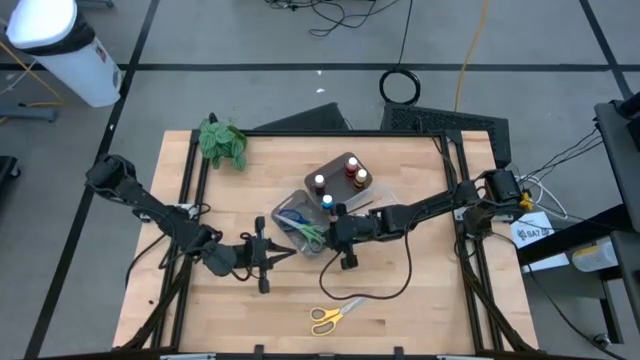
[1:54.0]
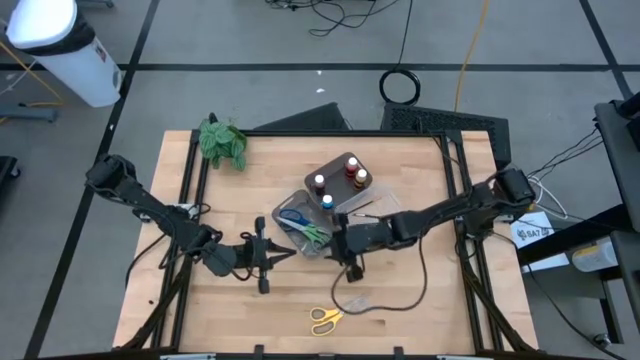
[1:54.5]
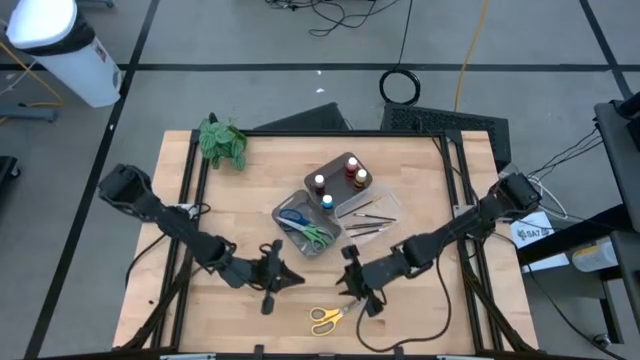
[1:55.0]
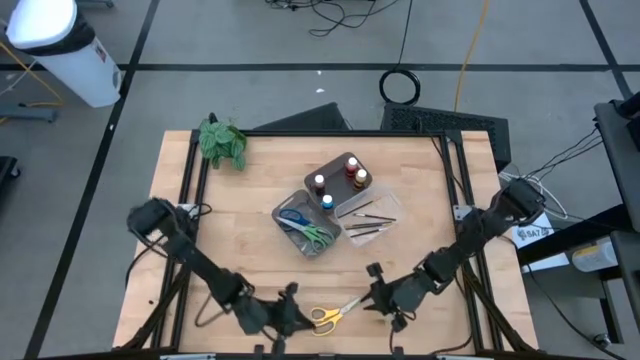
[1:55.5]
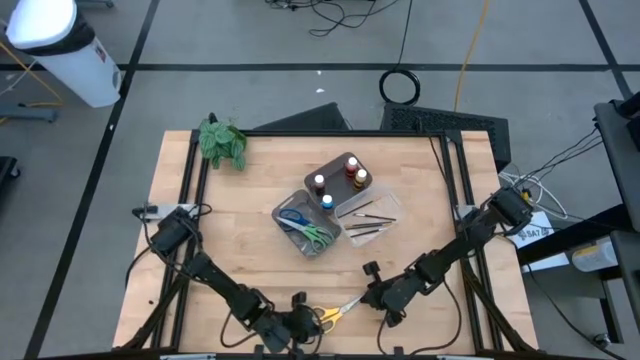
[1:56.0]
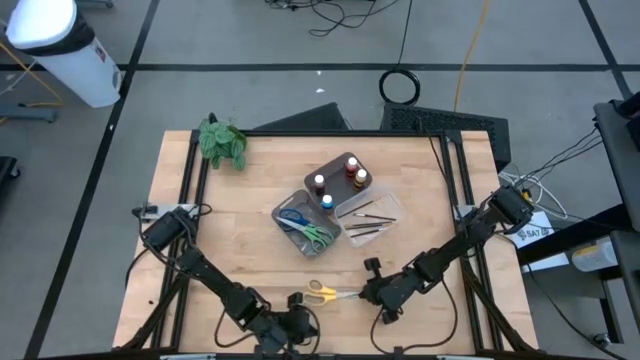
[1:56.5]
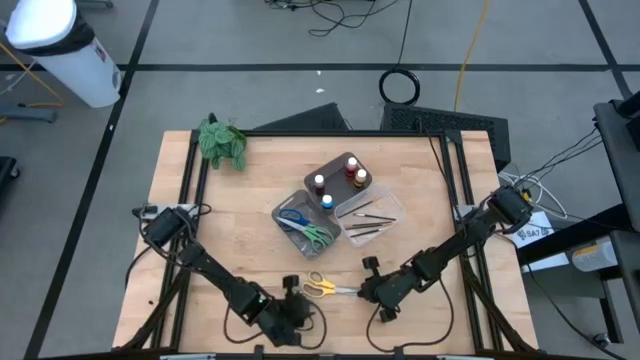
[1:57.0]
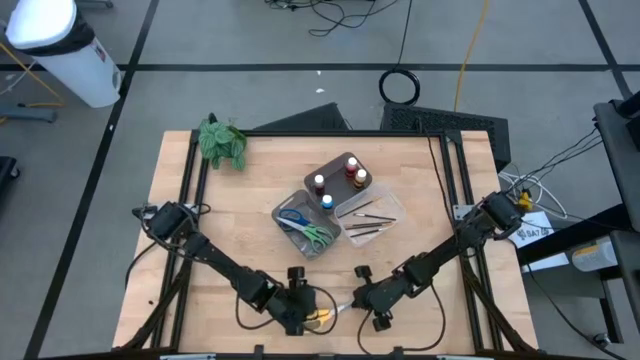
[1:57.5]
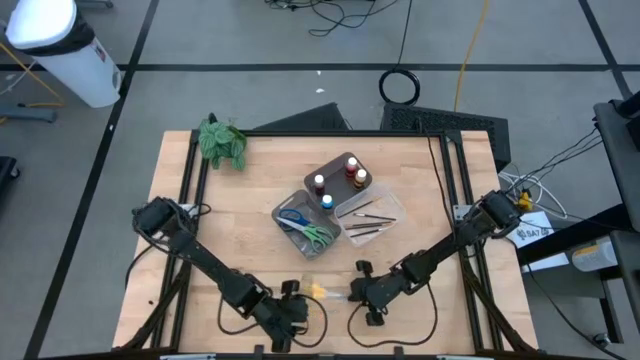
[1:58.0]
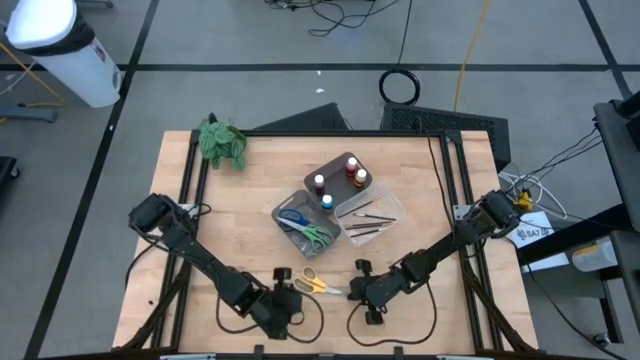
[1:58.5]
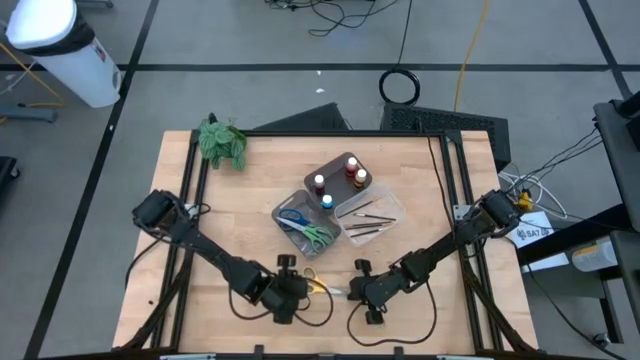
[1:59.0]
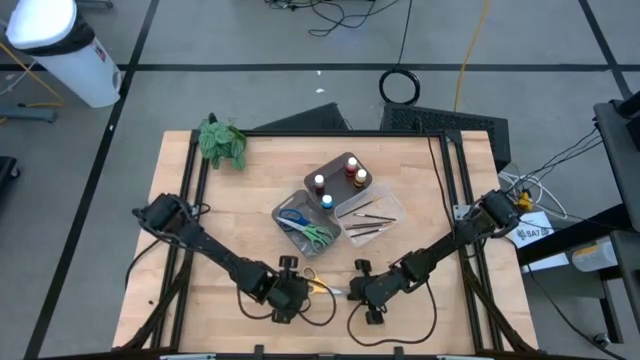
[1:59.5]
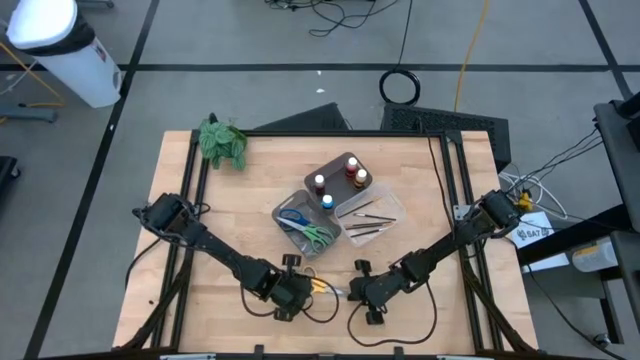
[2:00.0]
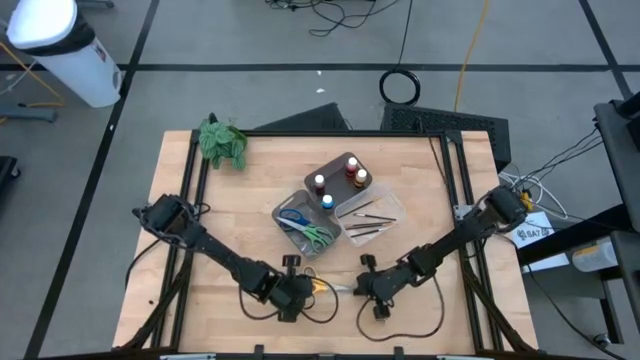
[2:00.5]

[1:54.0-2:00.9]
Task: Pick & Place Paint Supplies
Put the yellow scissors into the bottom black bin

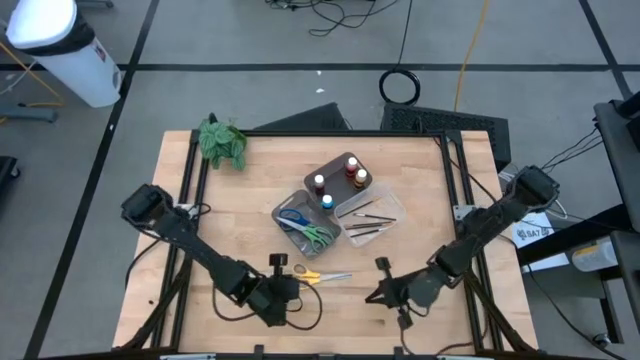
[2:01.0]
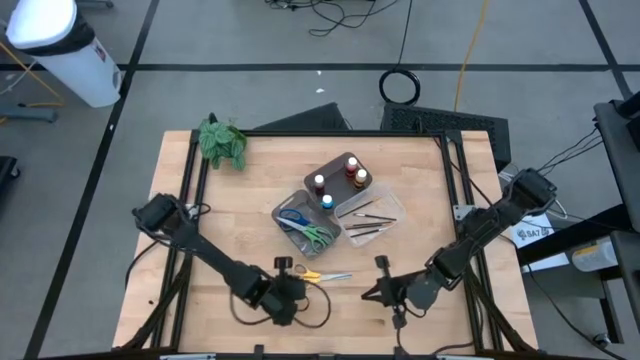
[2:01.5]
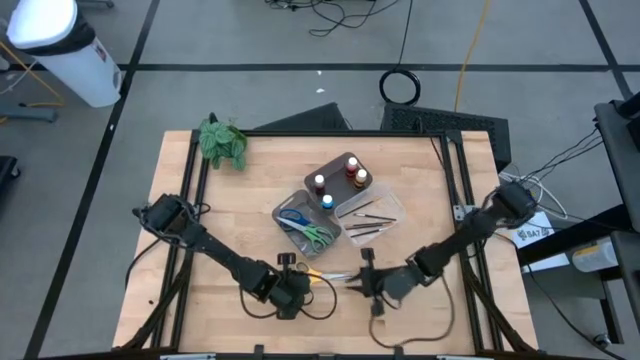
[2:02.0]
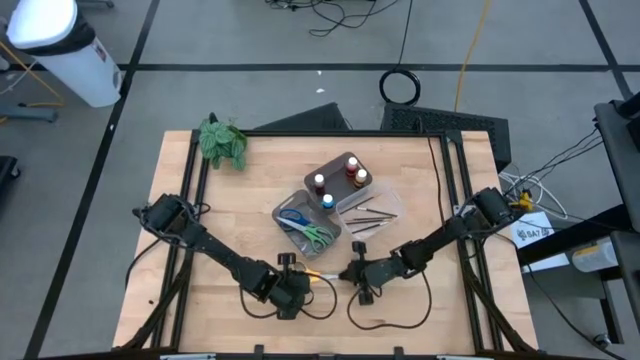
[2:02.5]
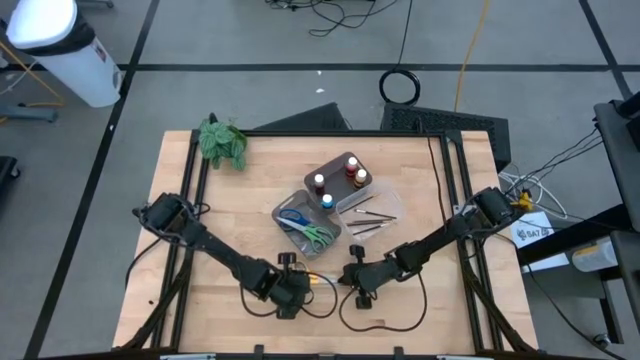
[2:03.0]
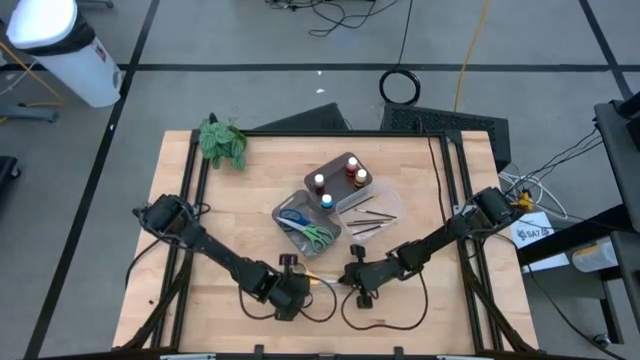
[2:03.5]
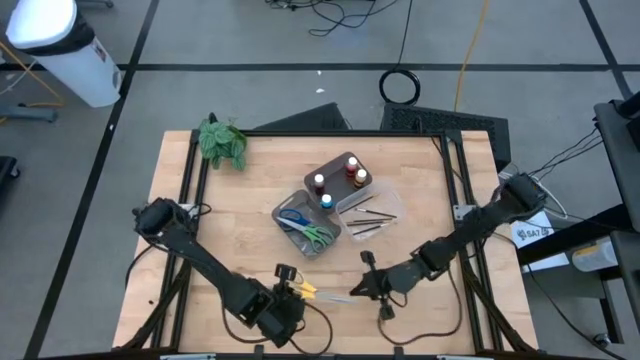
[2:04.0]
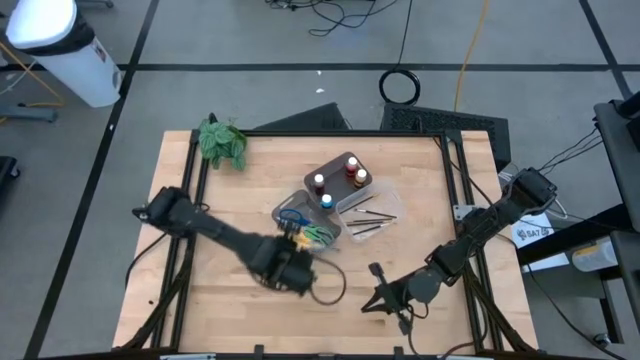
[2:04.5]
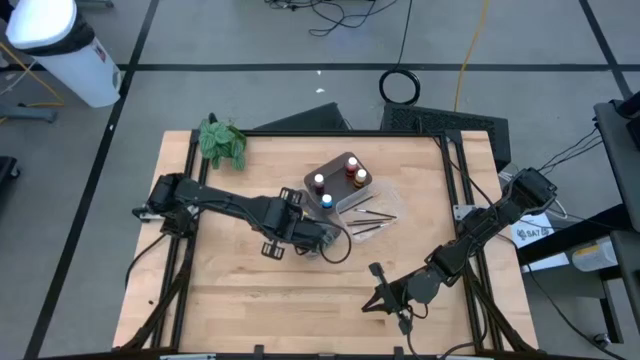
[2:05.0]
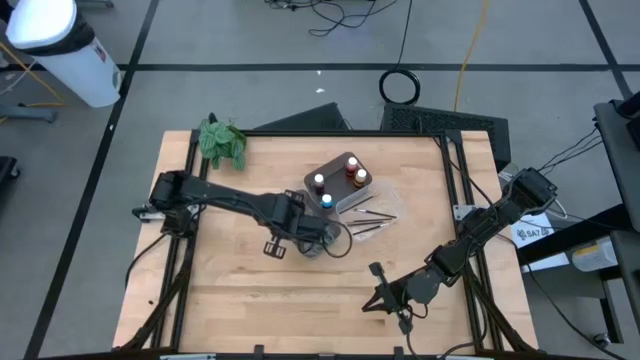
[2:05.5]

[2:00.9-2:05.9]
Put the yellow scissors into the bottom black bin

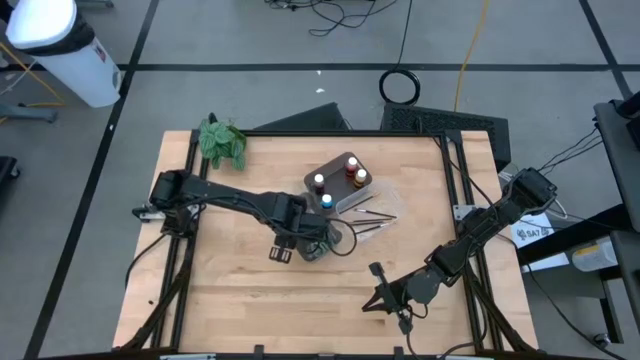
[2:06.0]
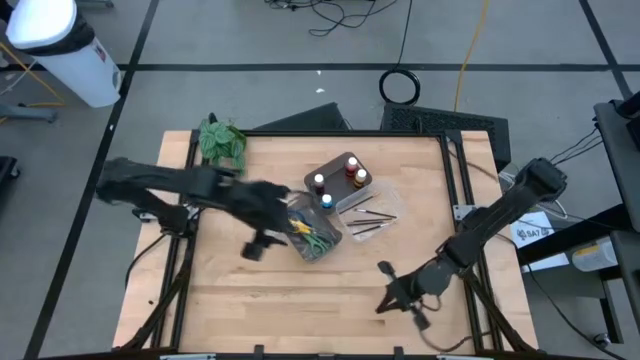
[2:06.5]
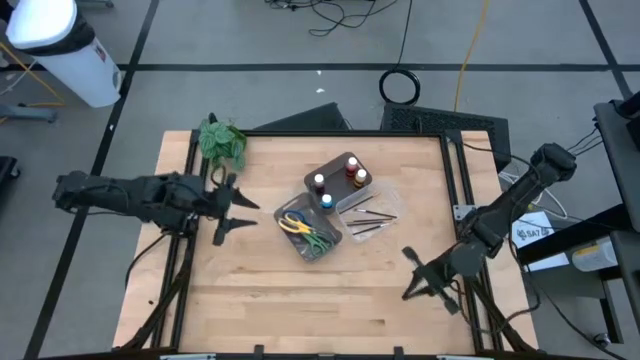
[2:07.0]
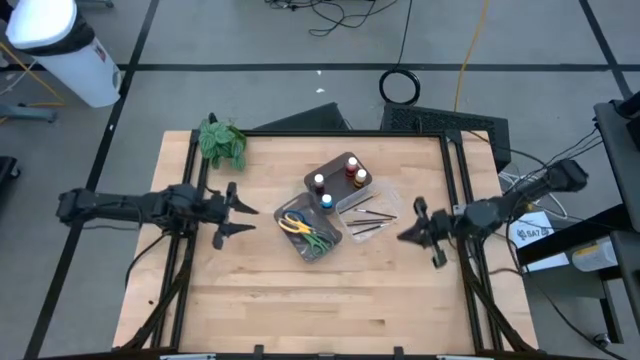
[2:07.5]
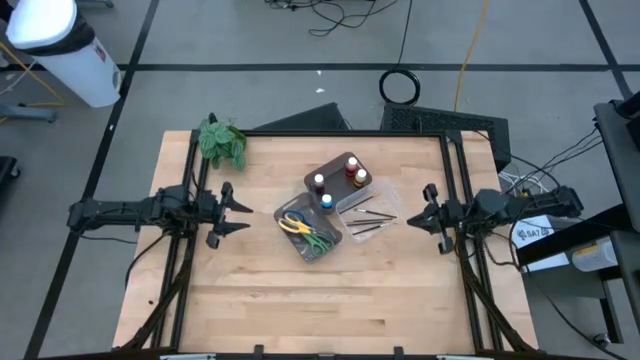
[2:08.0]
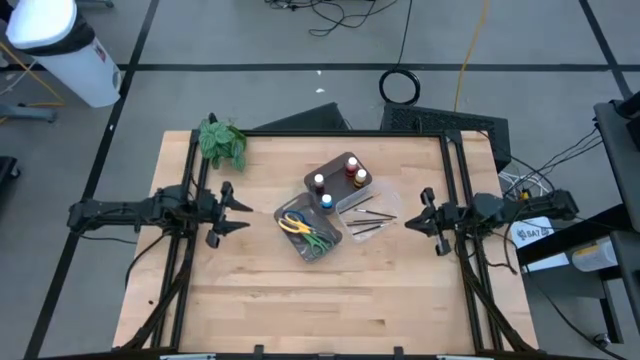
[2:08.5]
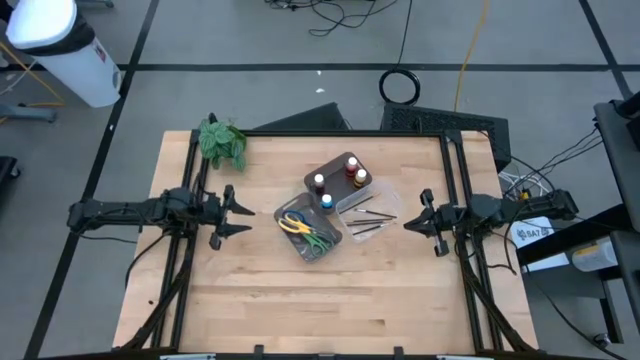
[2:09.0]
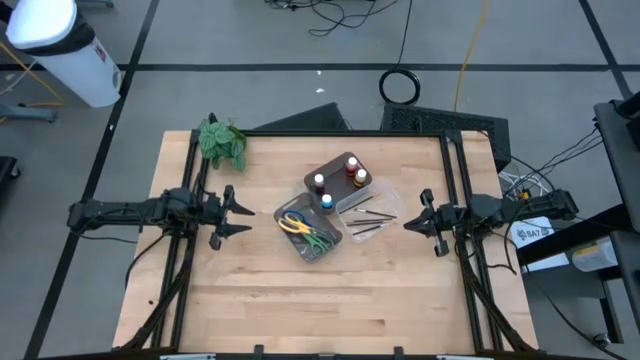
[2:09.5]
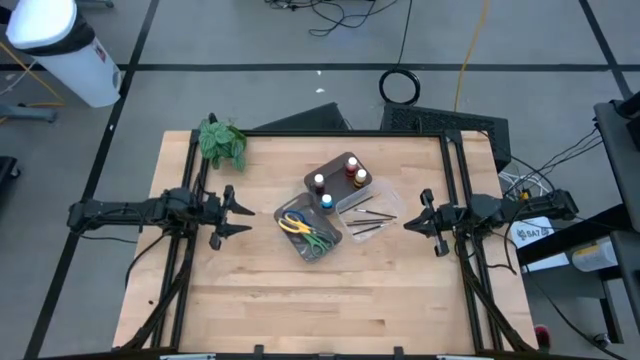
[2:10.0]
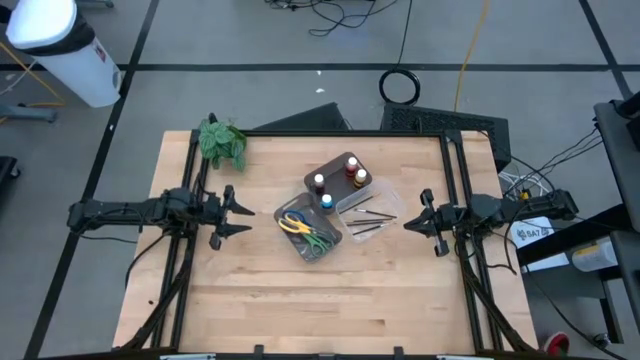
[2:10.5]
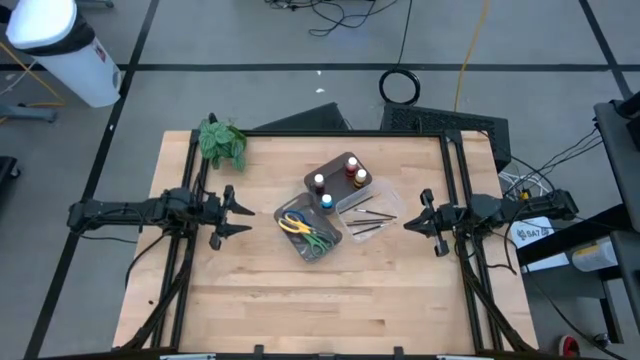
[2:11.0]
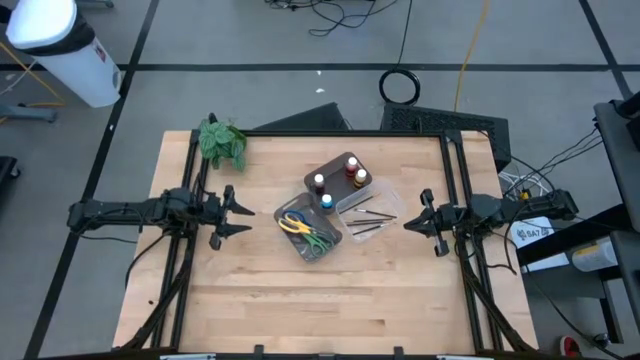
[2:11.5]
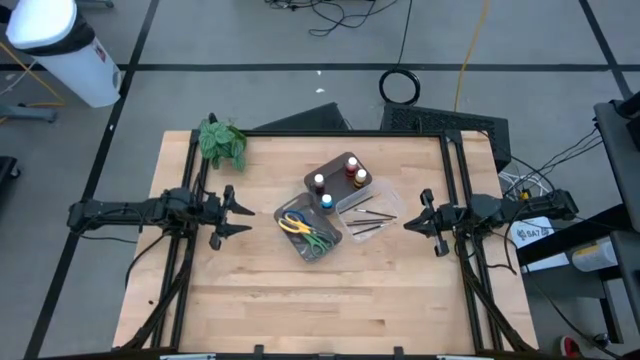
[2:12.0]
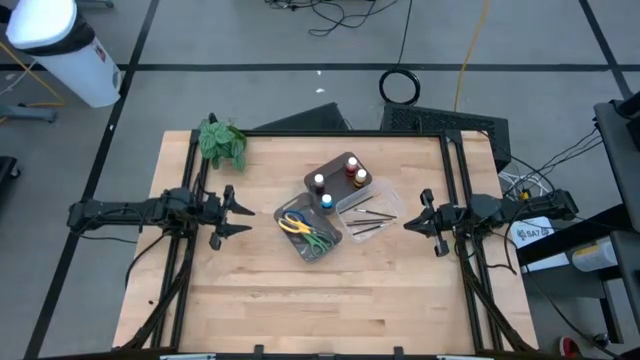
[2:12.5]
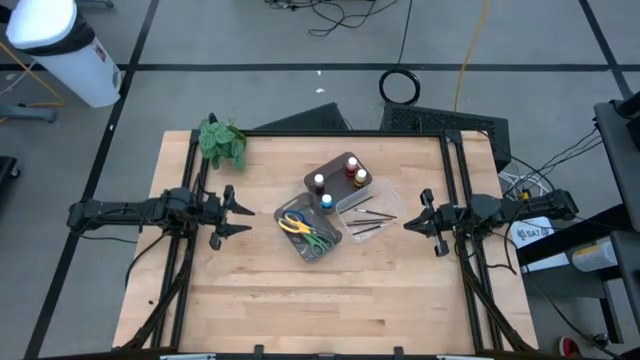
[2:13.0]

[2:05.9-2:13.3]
Return to Home Position
